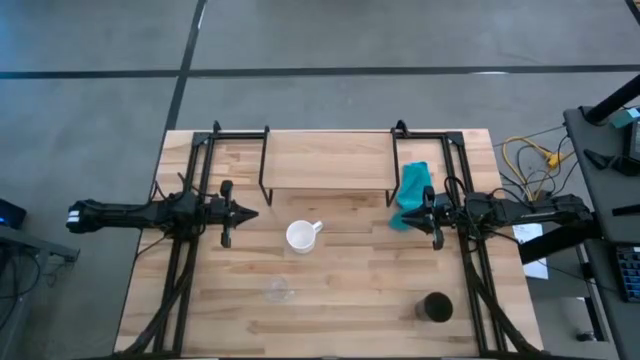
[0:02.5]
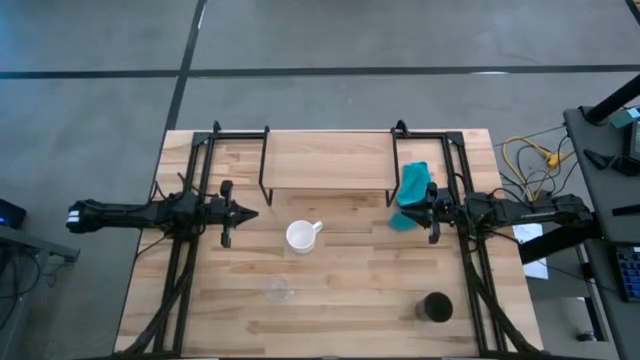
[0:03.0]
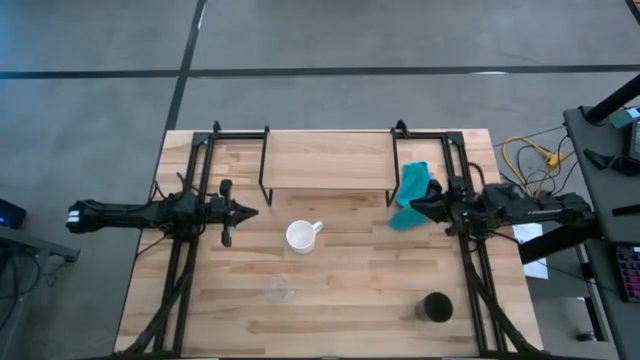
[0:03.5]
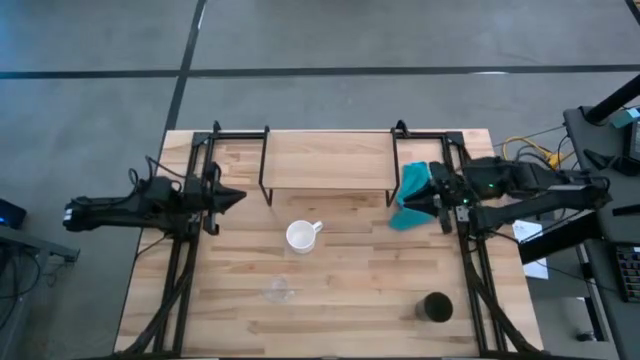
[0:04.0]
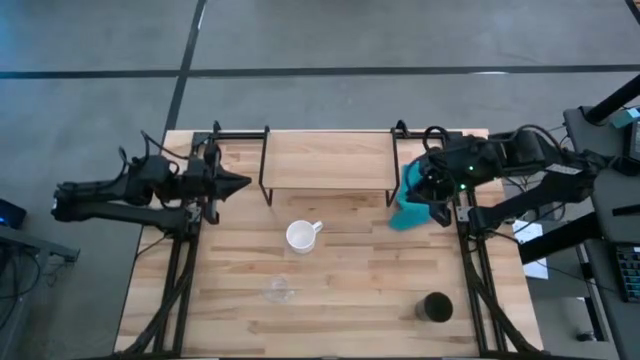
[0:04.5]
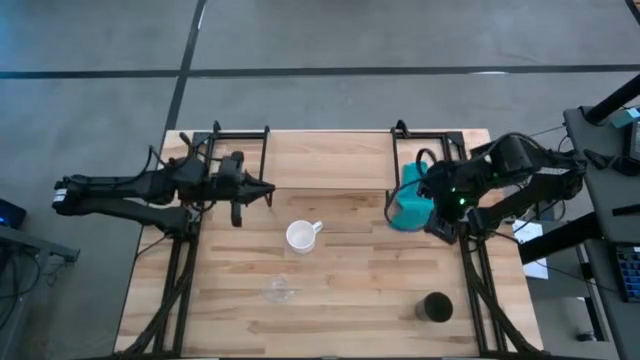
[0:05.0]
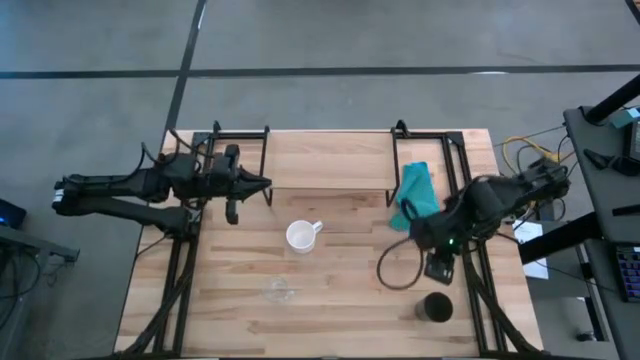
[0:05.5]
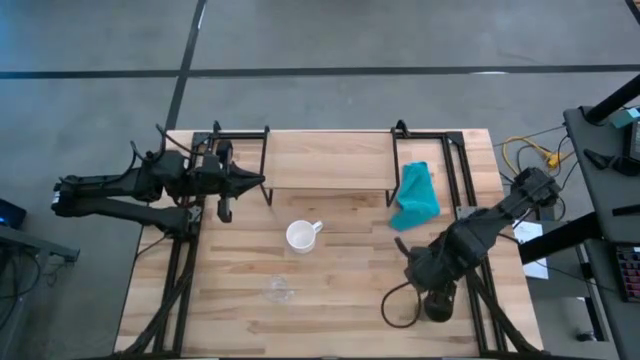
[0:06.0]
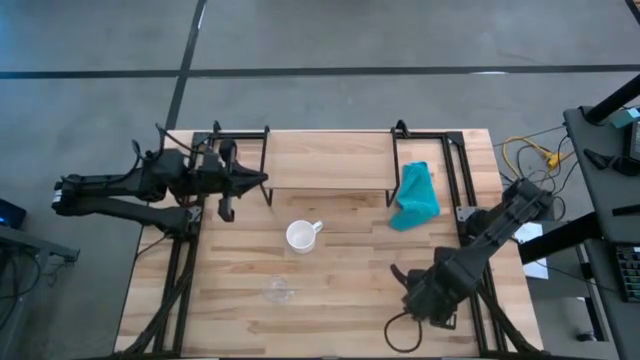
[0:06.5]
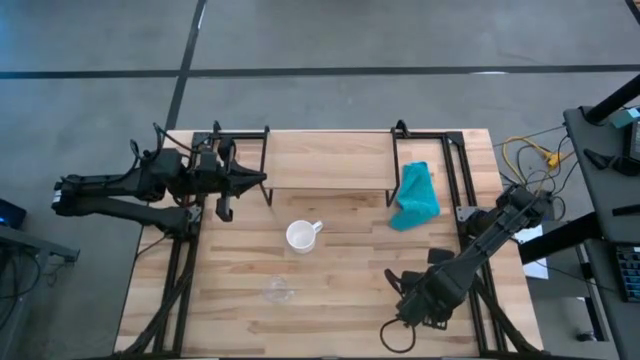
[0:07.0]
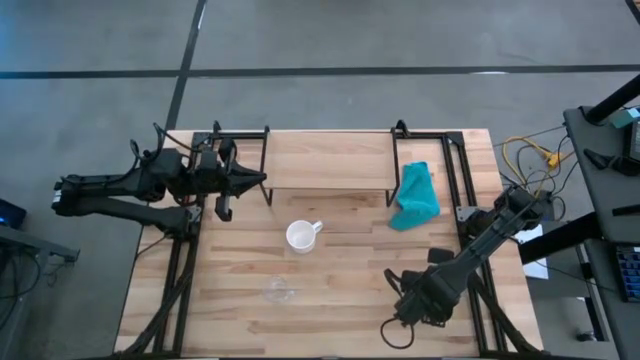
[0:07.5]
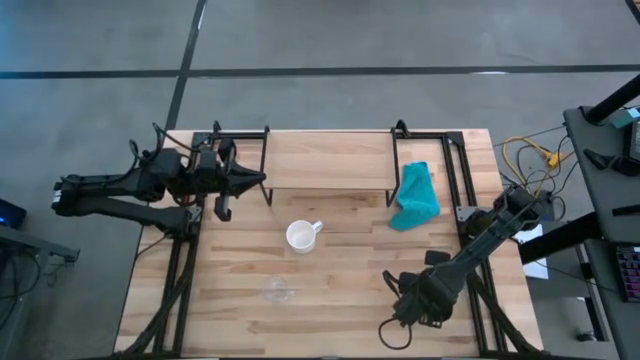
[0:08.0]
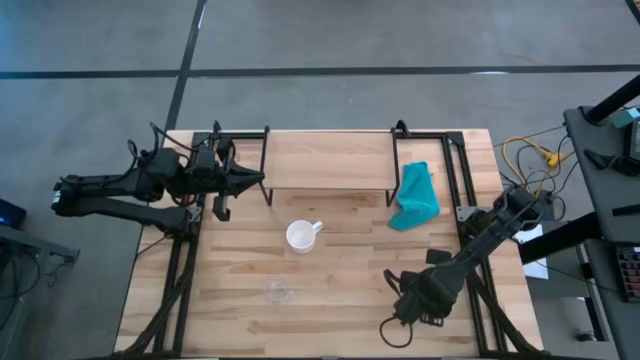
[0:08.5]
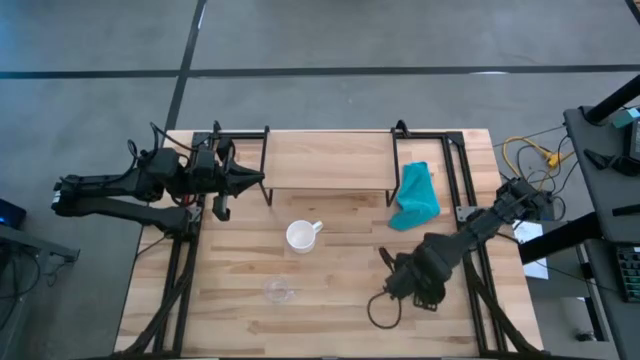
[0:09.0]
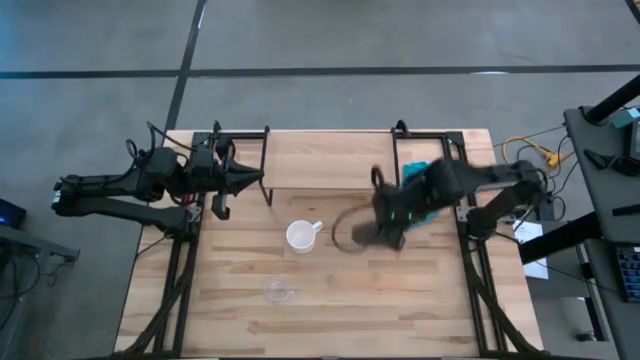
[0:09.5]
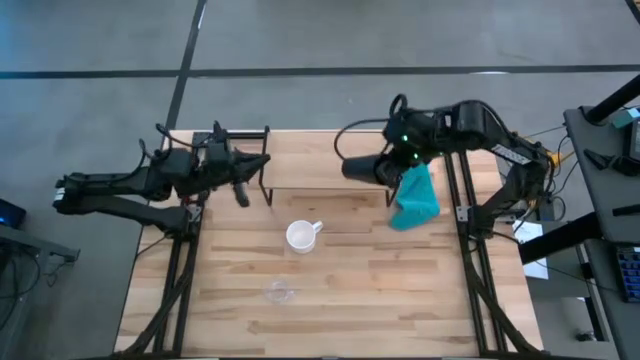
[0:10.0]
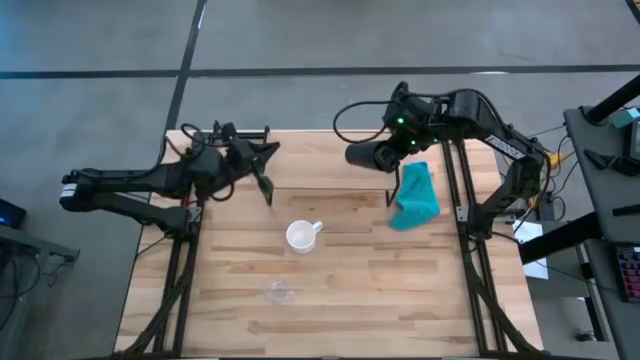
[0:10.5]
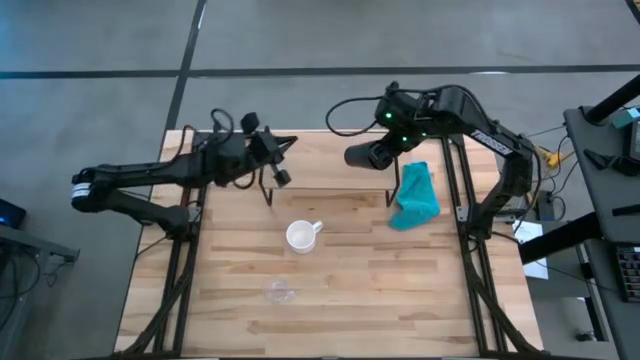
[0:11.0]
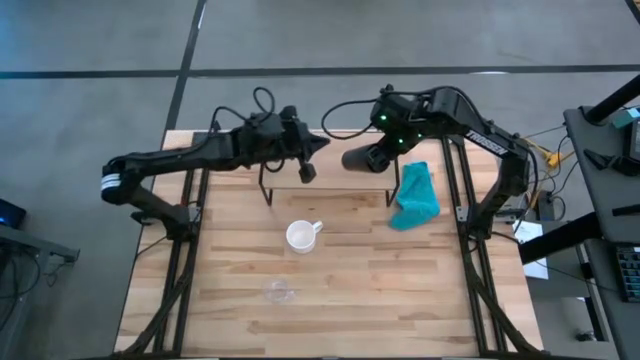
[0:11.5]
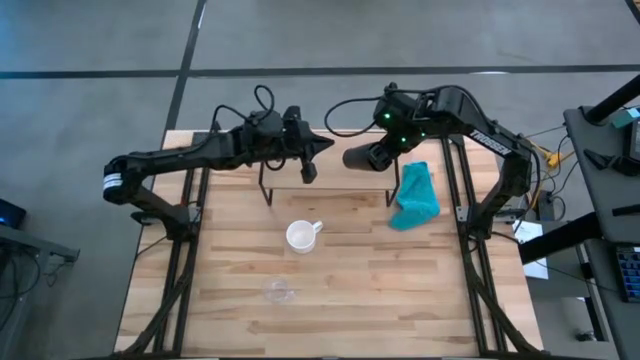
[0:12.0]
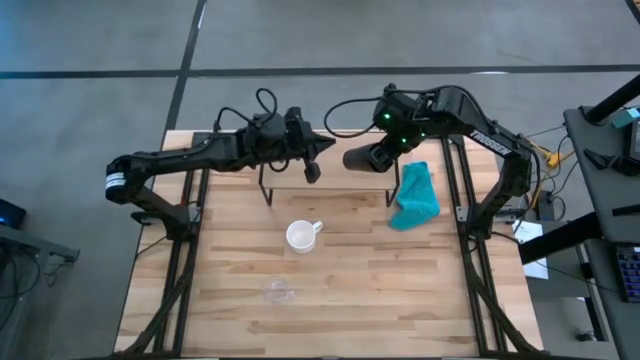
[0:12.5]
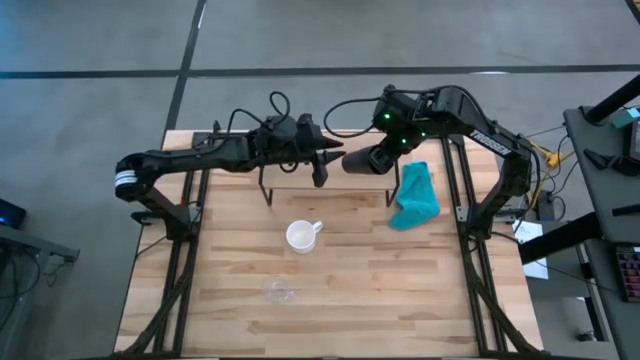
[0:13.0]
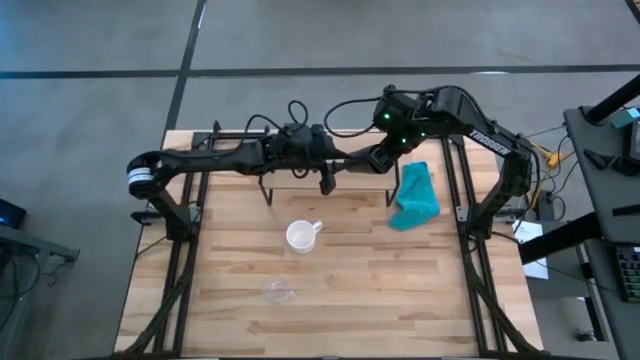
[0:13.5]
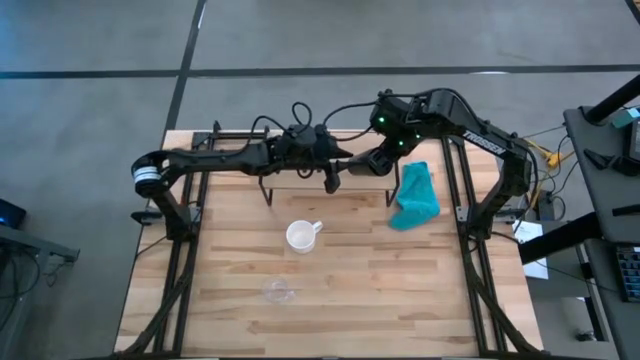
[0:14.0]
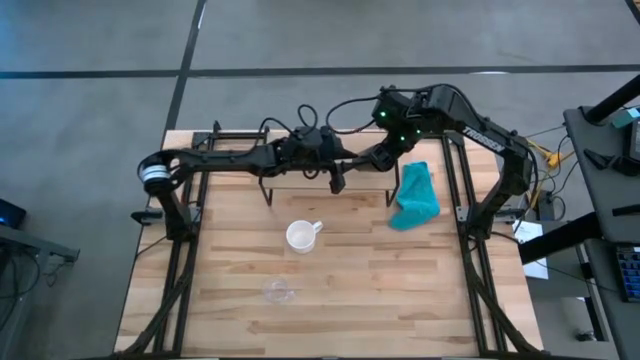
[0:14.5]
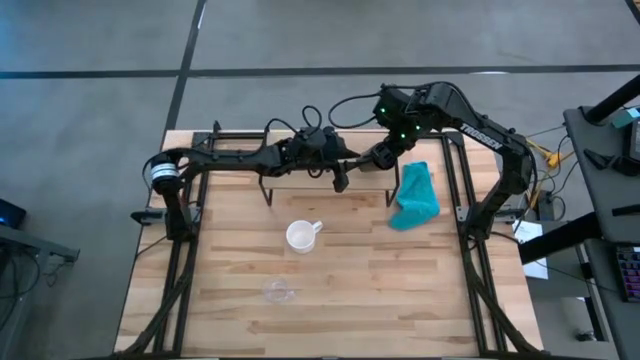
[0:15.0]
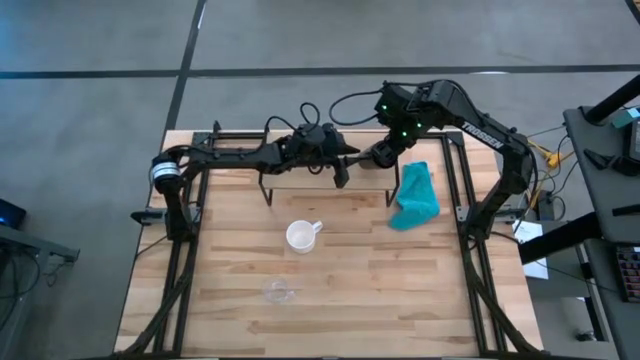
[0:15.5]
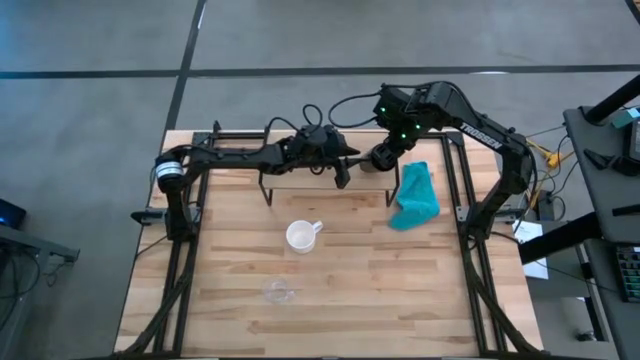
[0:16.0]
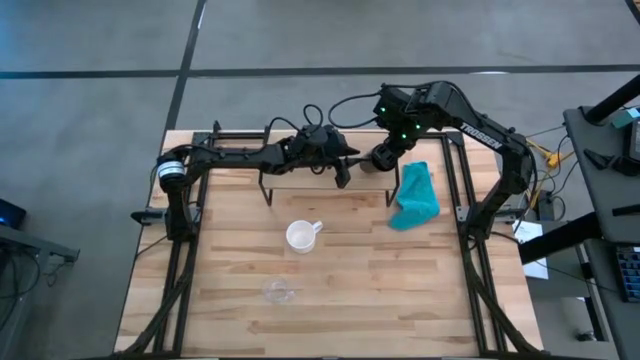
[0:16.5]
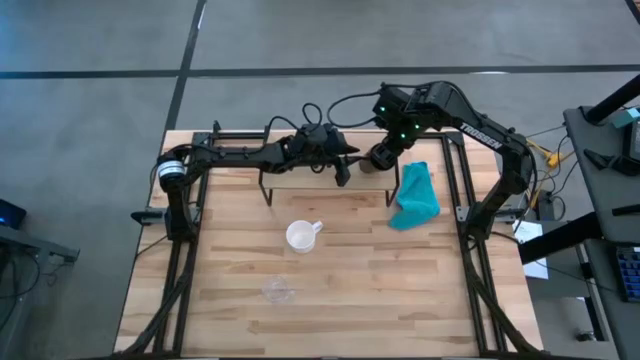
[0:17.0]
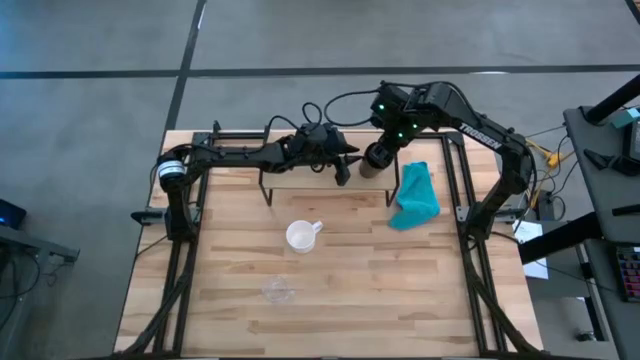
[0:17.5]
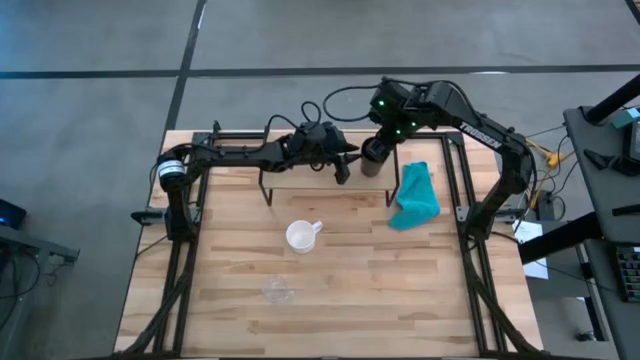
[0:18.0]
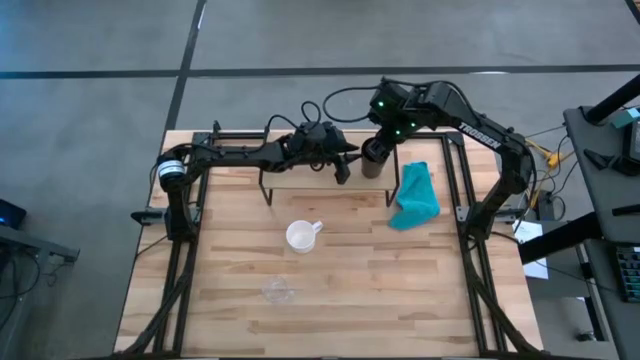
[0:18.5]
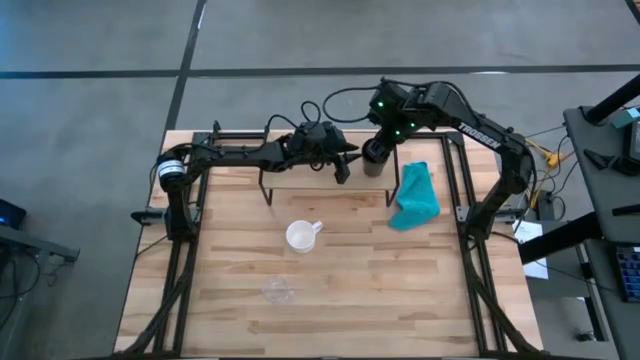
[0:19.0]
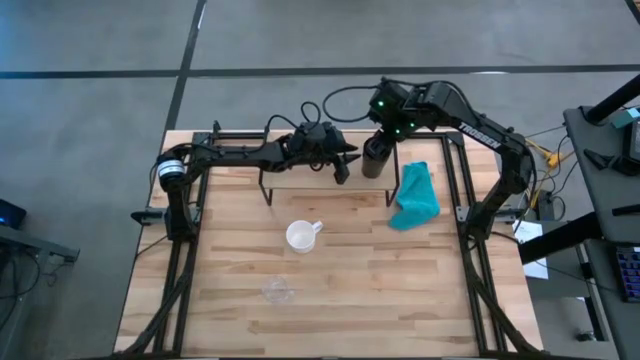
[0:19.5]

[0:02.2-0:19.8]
Task: Stack small to large cups/mugs on shelf
Put the black cup on the shelf

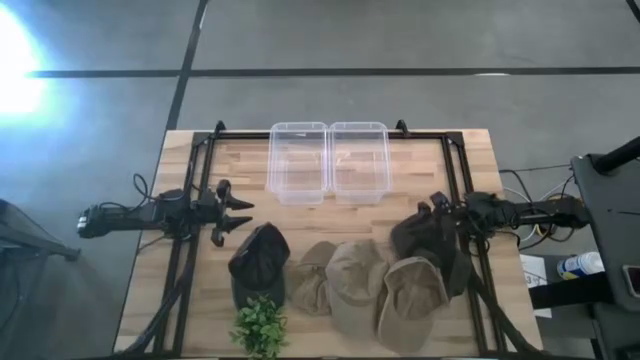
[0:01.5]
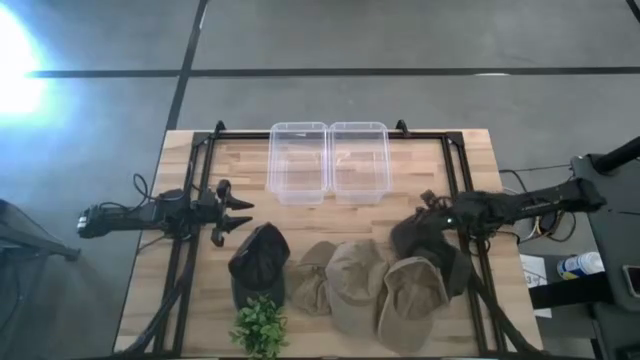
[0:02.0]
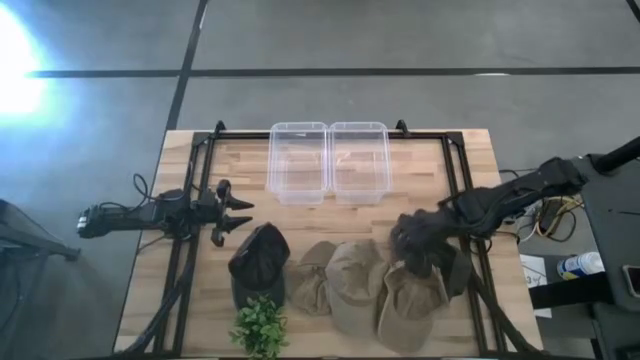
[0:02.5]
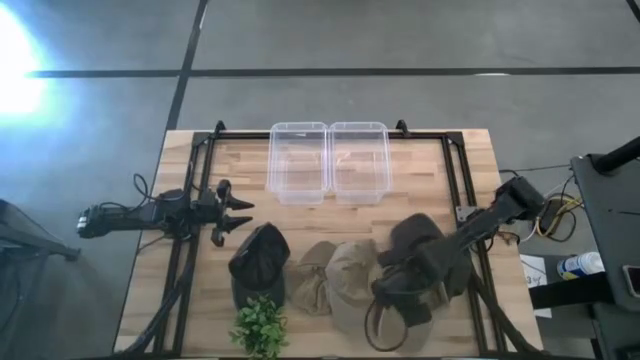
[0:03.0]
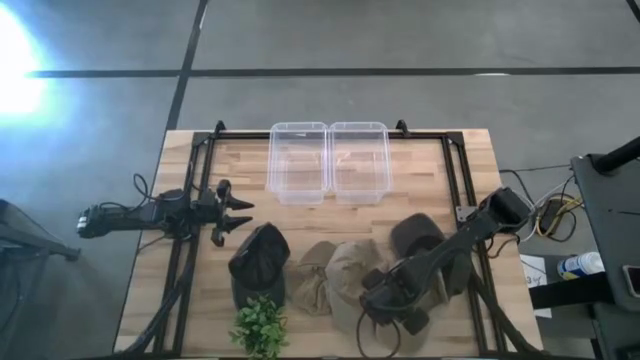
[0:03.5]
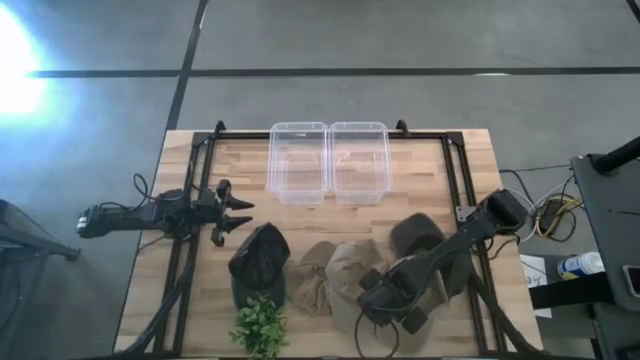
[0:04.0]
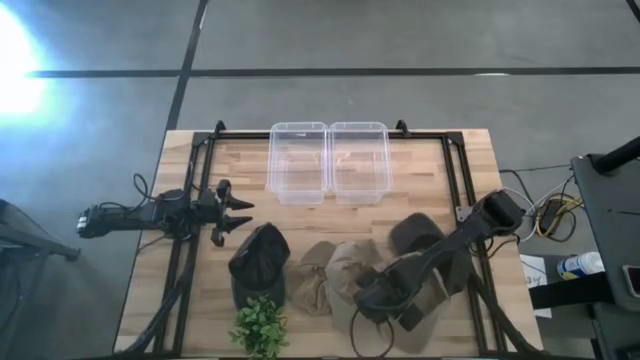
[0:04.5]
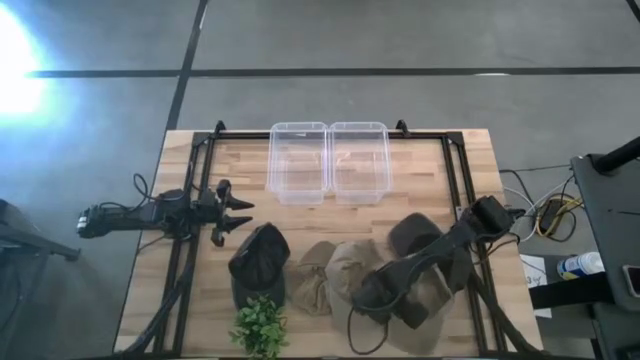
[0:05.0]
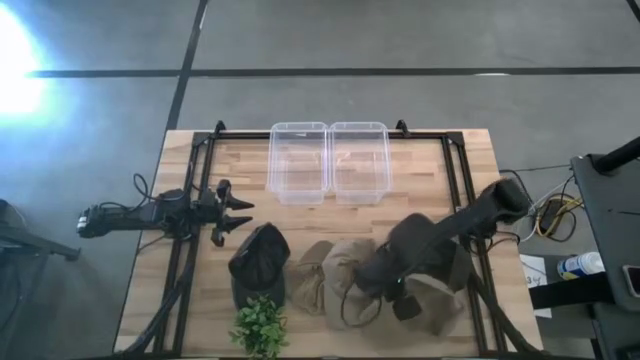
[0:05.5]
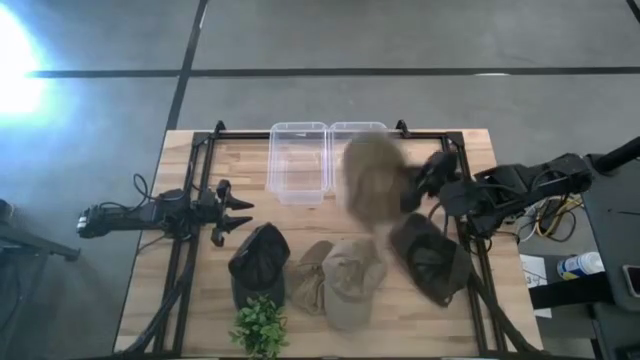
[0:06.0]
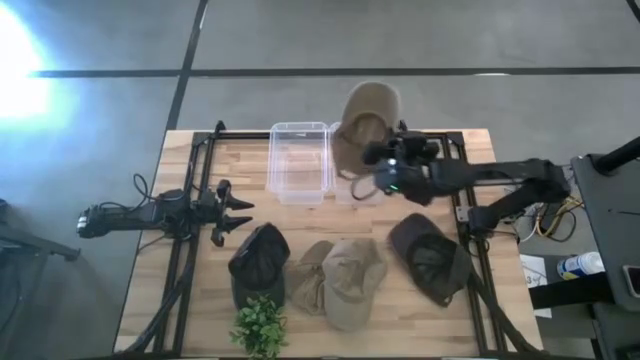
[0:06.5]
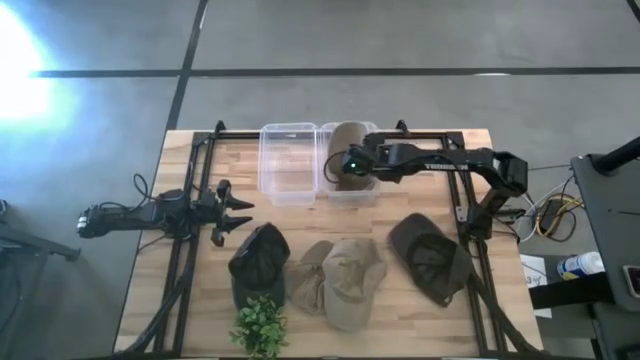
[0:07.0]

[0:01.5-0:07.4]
Task: Pick & Place hat
Put the right brown cap into the right transparent bin
